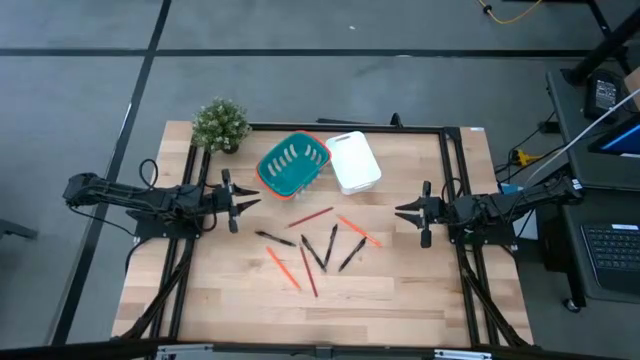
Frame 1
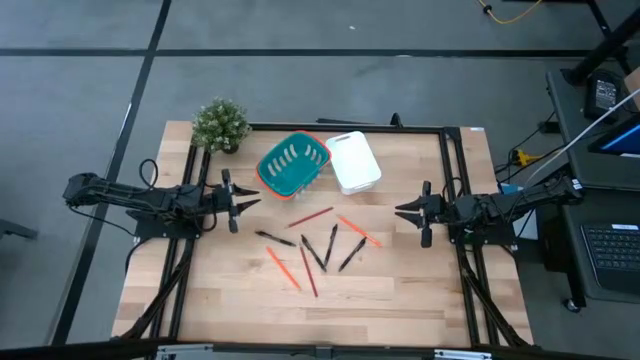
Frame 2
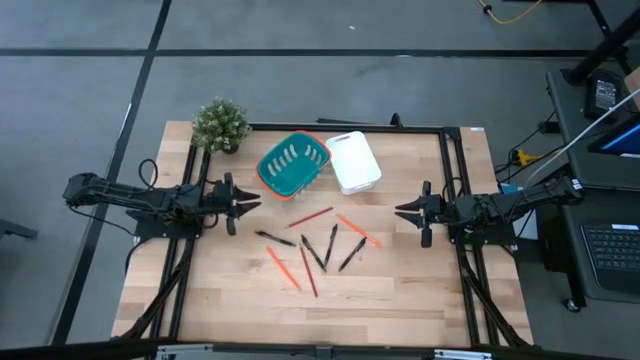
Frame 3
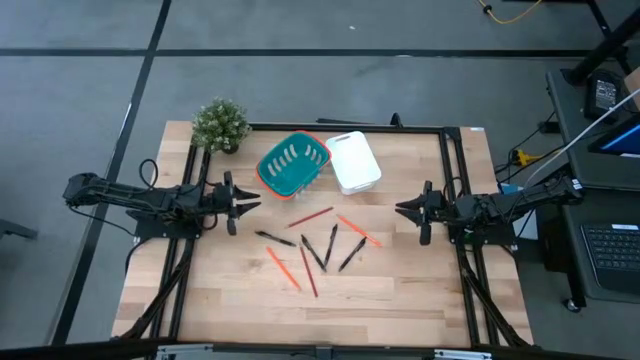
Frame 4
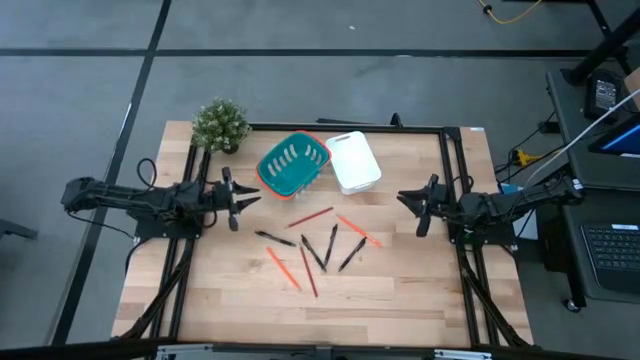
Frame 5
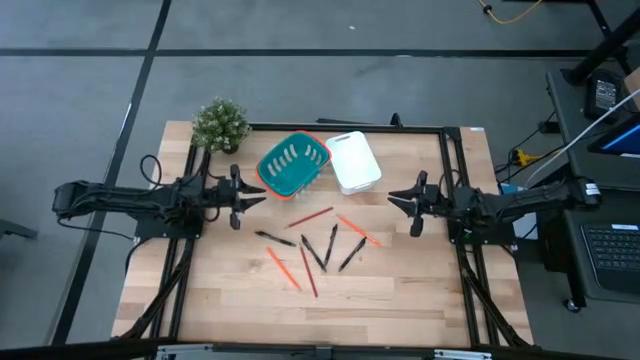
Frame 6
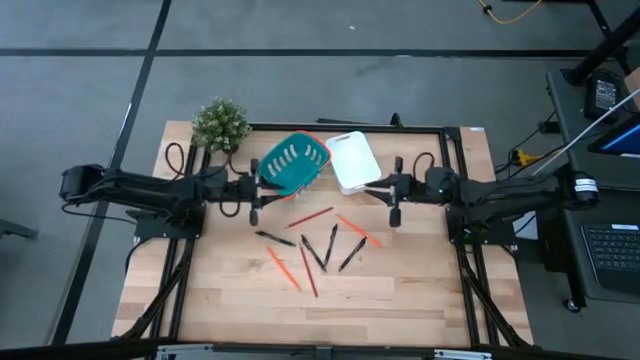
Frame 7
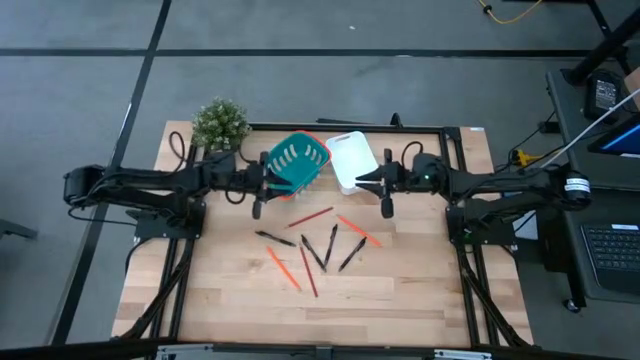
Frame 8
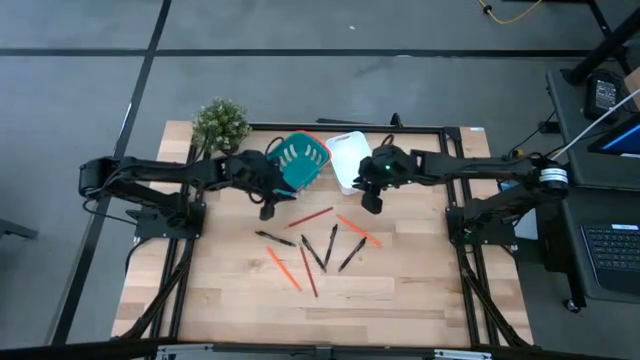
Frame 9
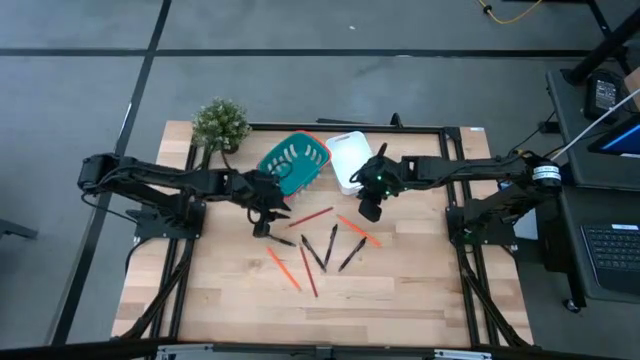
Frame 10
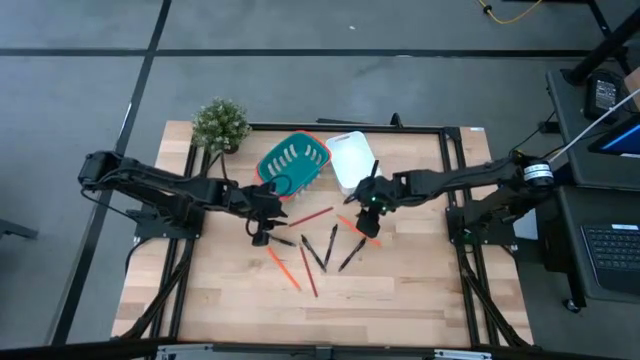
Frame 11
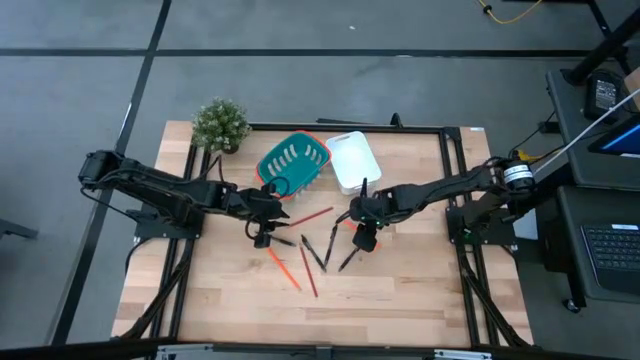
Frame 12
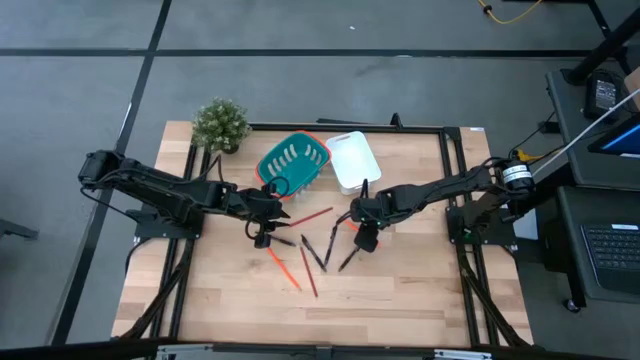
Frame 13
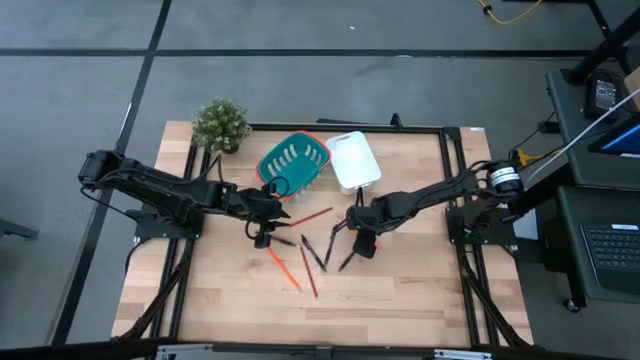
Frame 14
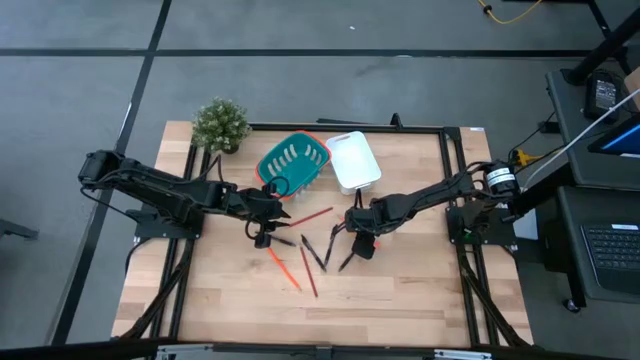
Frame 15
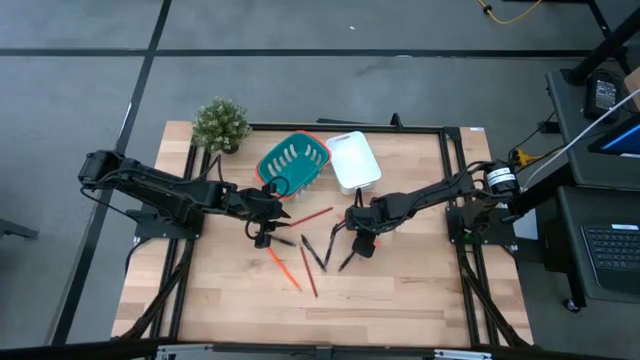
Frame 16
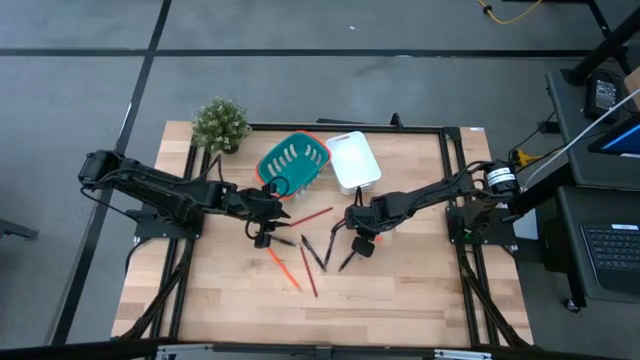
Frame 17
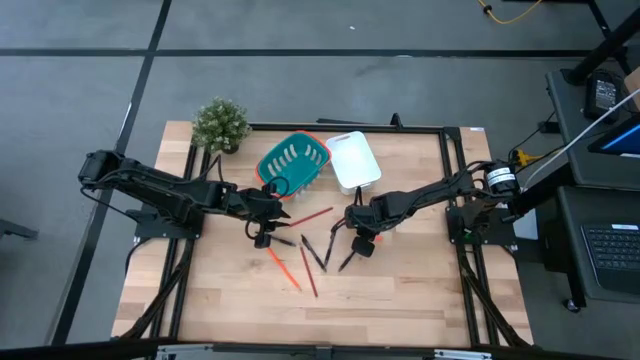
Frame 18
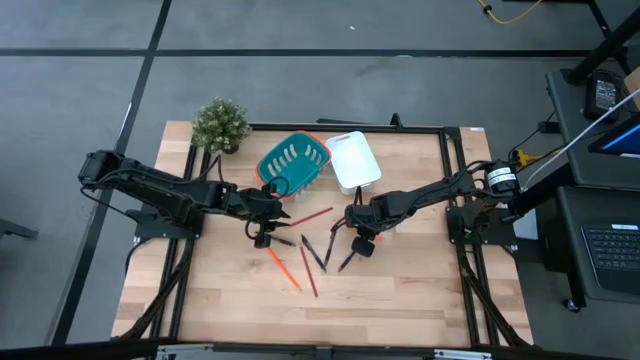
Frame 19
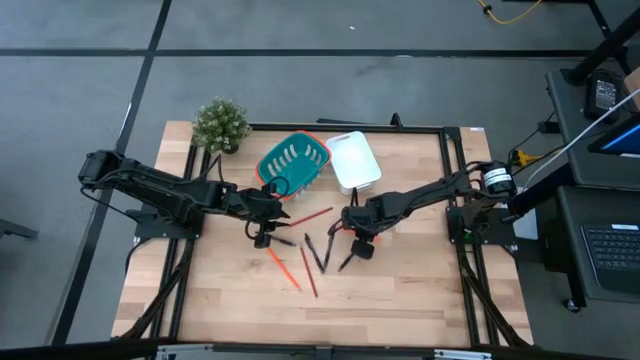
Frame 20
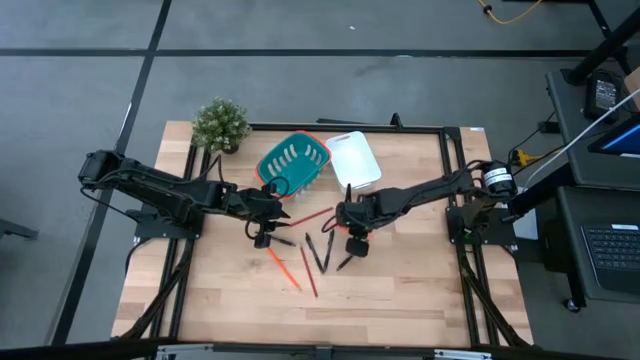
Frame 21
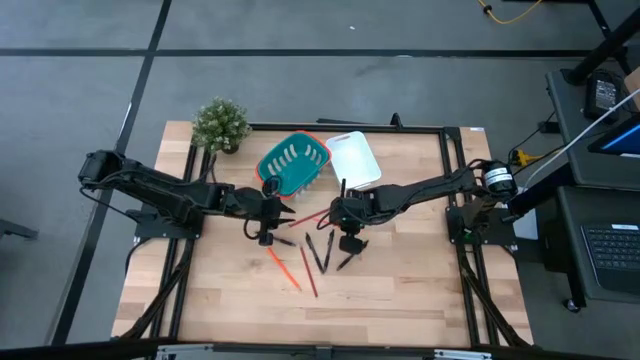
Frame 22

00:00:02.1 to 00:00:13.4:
Task: Sort pens & pencils
Put the orange pencil into the green basket

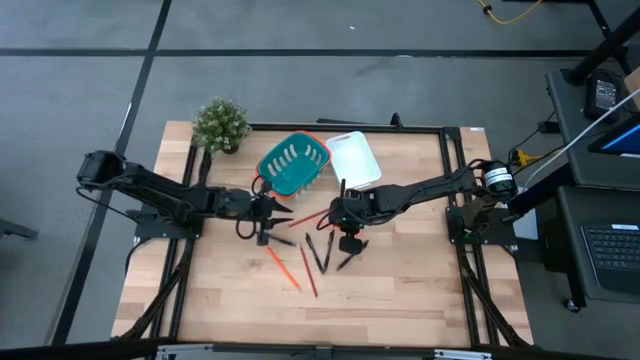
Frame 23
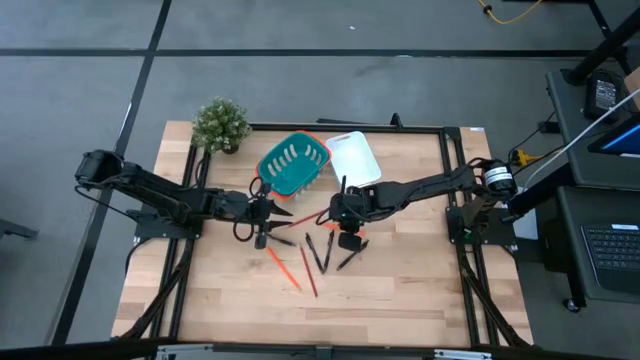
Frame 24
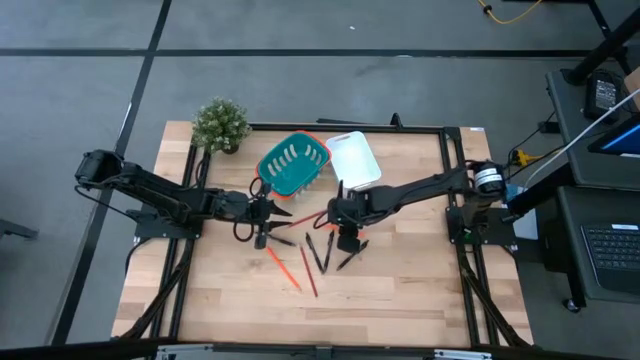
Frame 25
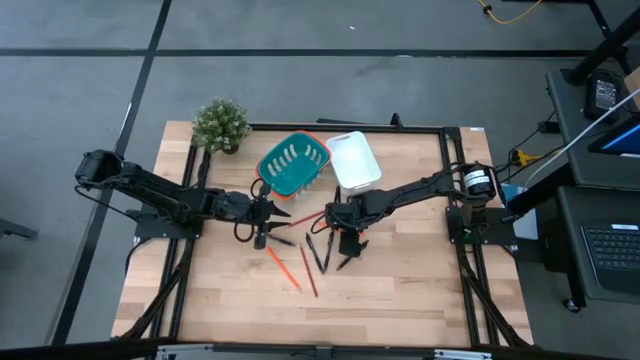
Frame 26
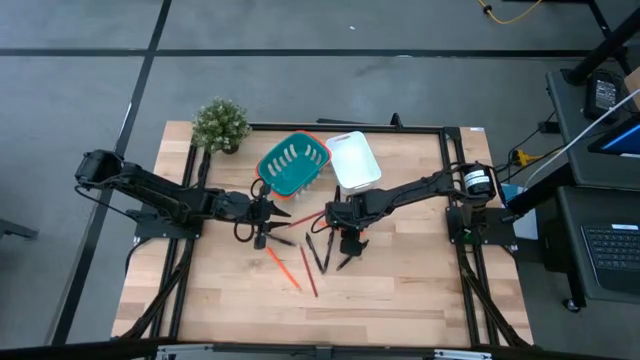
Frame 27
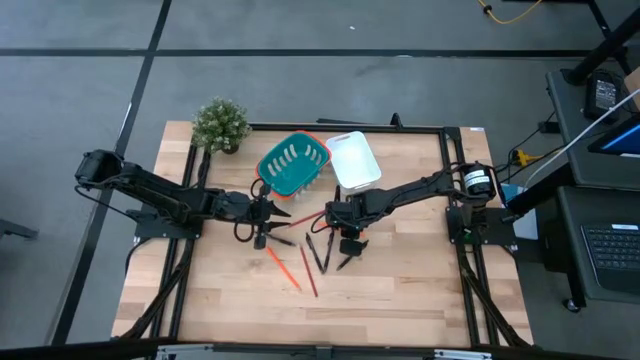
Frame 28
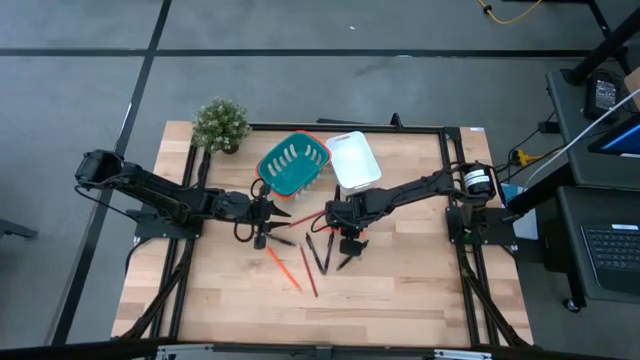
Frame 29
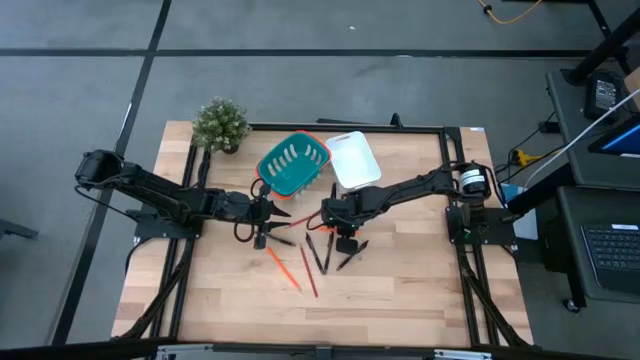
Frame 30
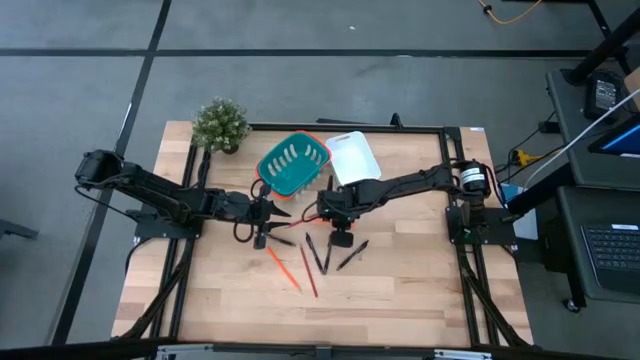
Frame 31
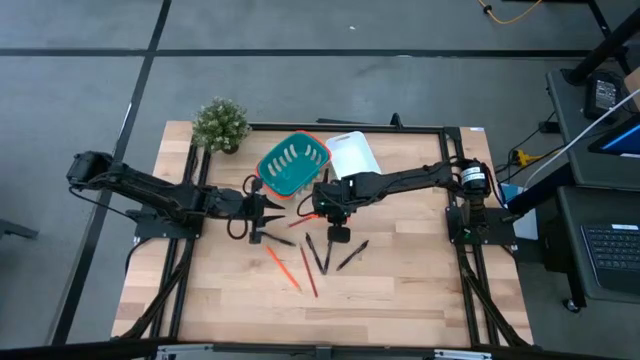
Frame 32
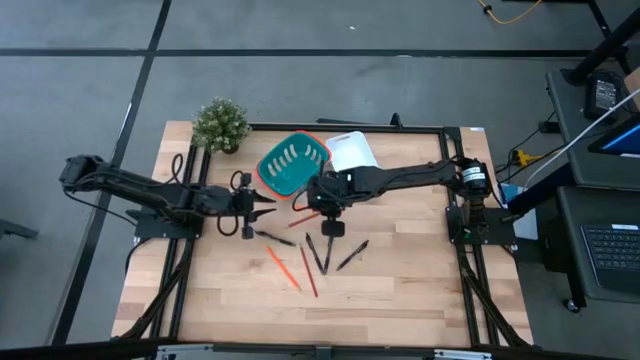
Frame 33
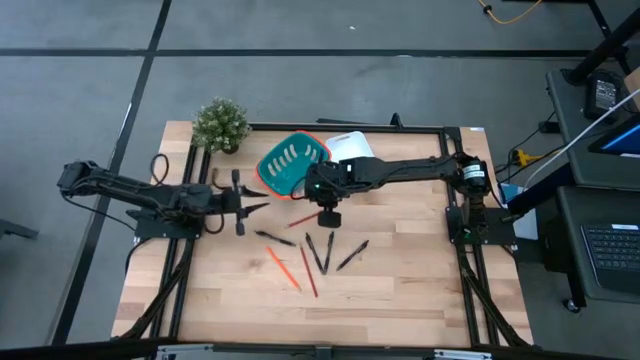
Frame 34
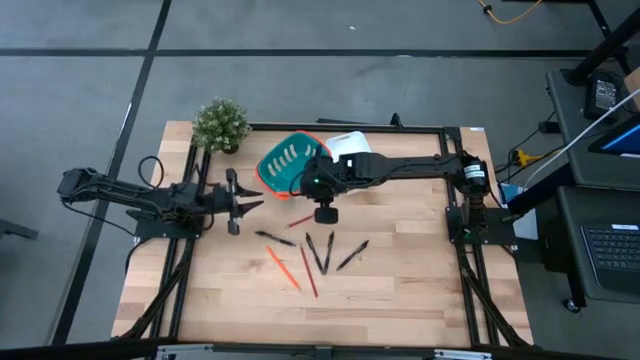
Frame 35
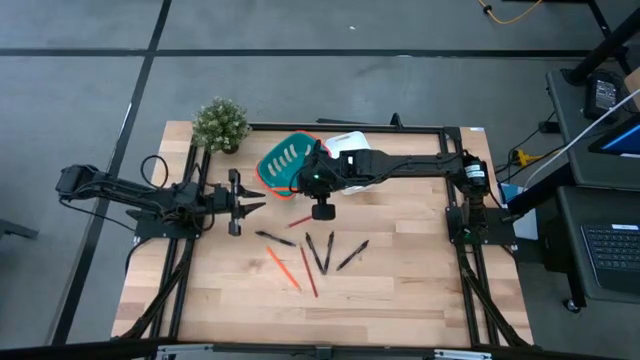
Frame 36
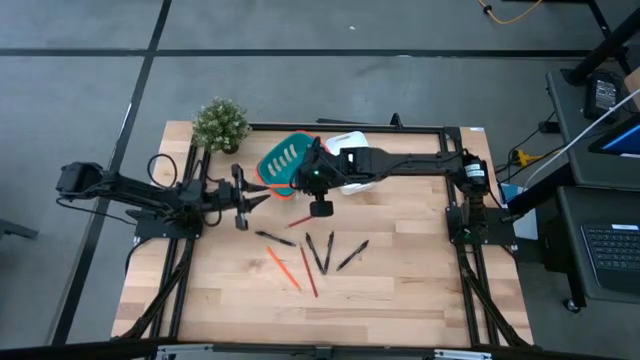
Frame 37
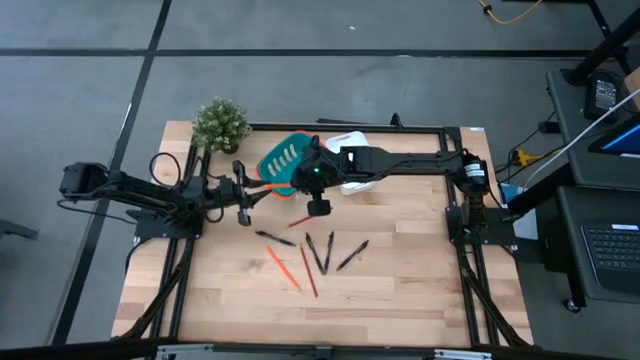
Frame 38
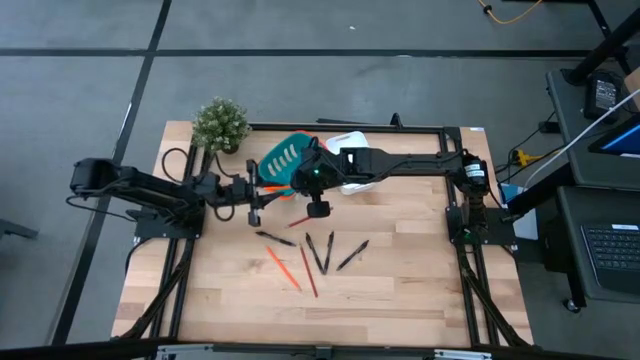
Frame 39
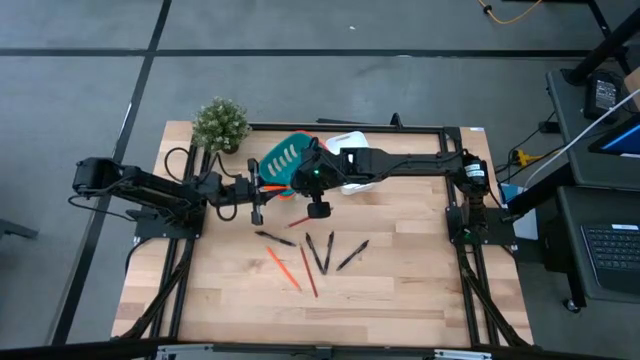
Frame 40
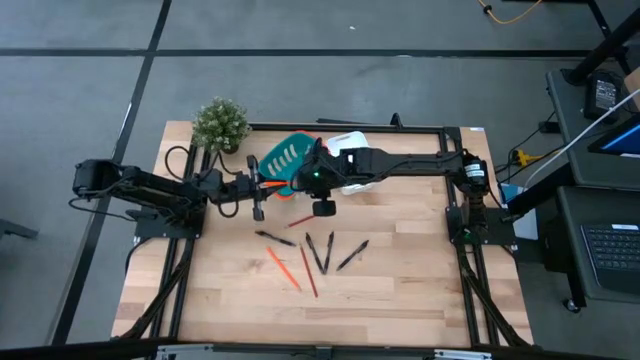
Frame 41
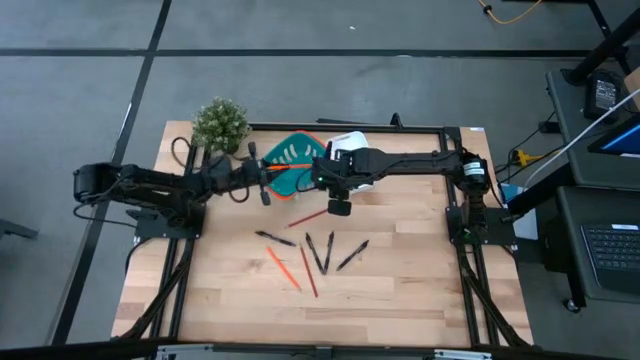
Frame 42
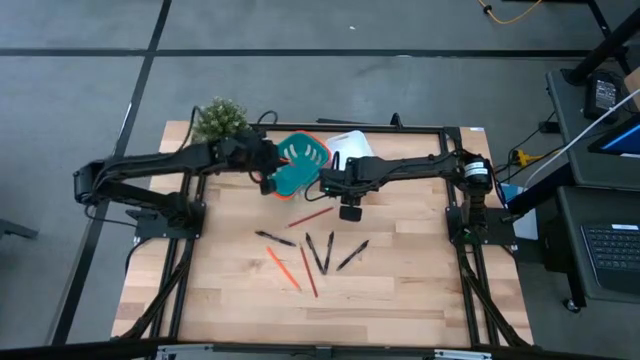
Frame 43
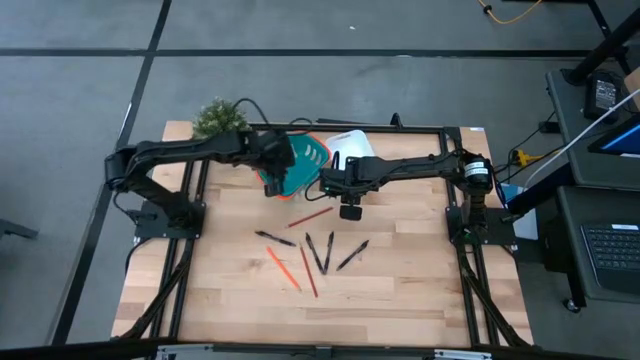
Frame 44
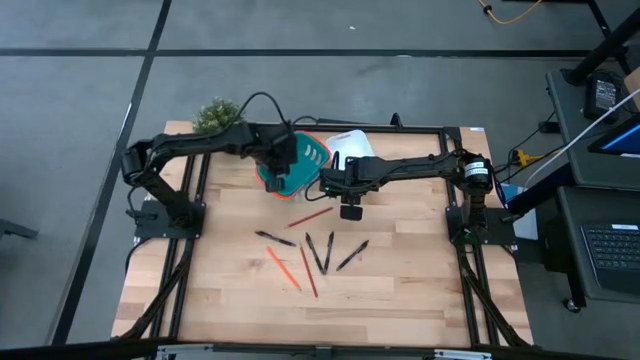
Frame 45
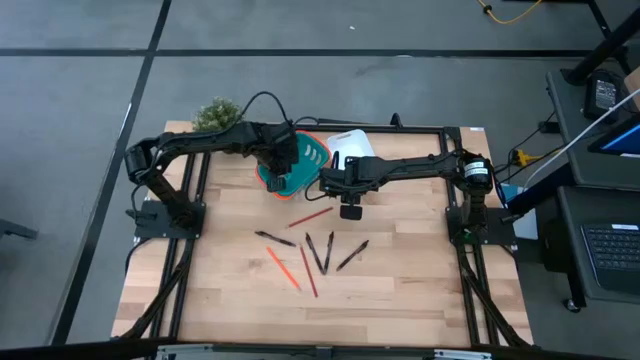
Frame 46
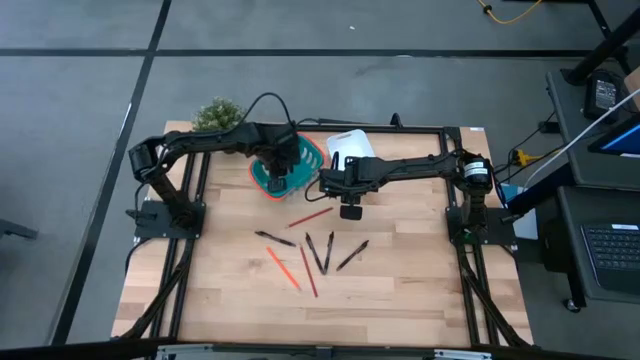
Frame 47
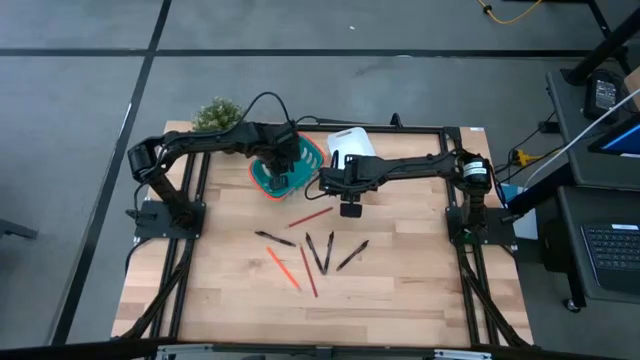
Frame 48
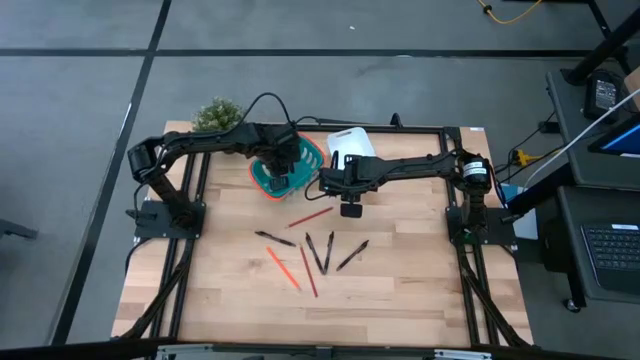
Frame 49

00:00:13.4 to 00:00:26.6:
Put the orange pencil into the green basket
